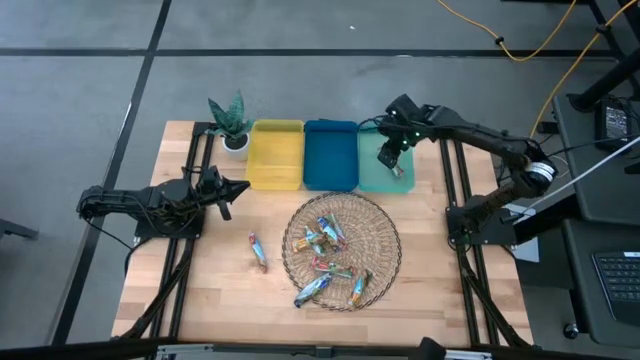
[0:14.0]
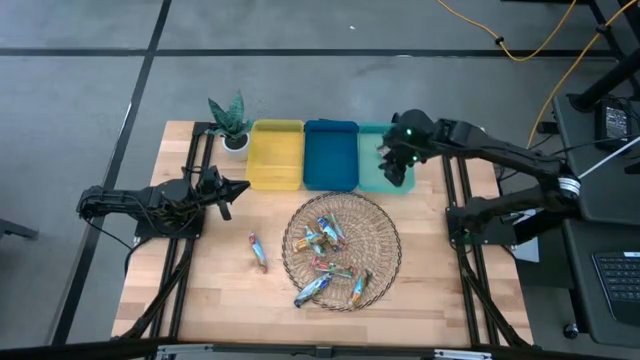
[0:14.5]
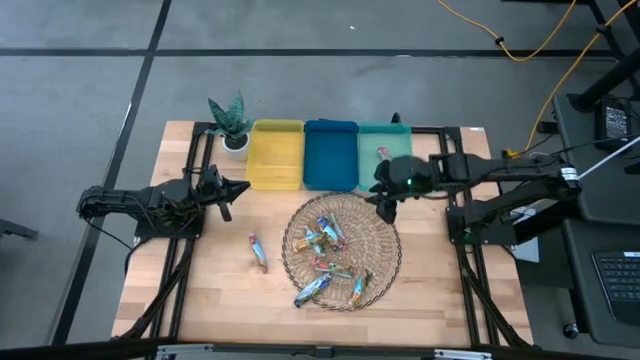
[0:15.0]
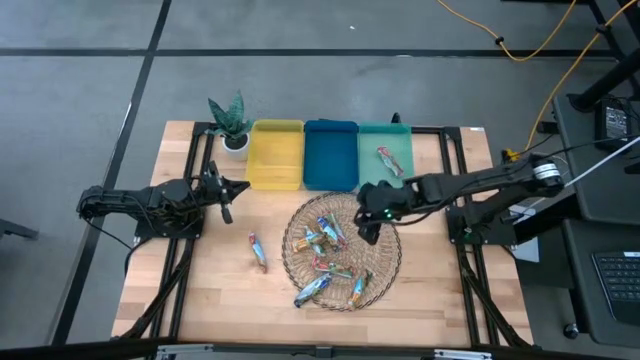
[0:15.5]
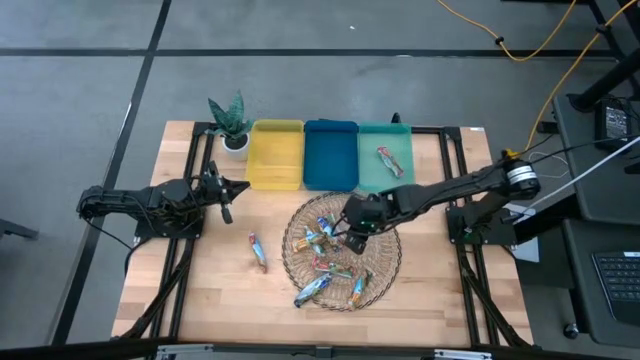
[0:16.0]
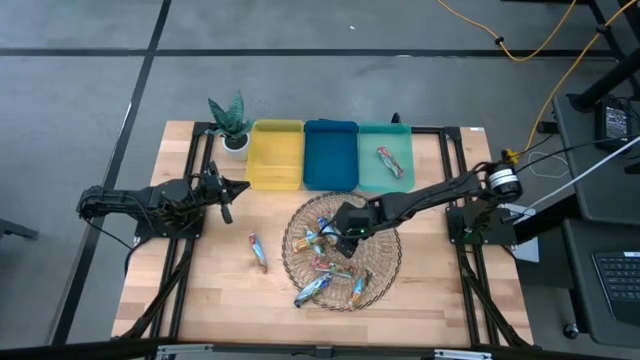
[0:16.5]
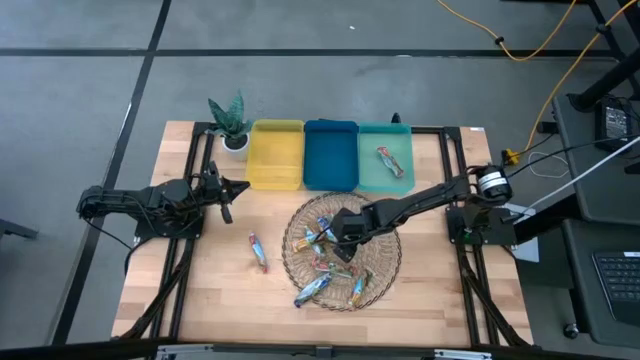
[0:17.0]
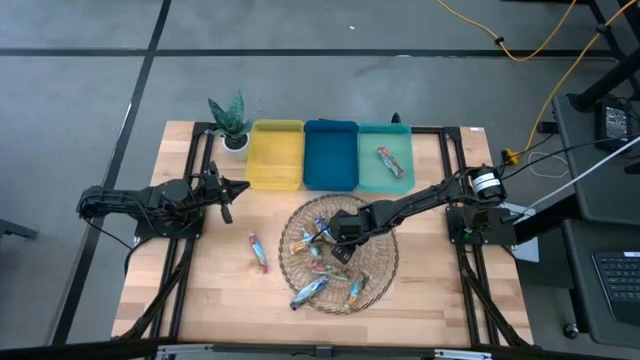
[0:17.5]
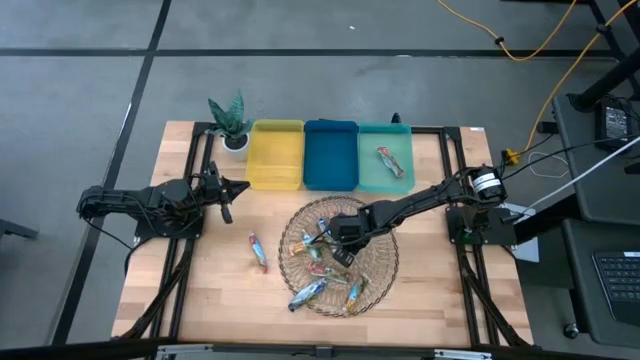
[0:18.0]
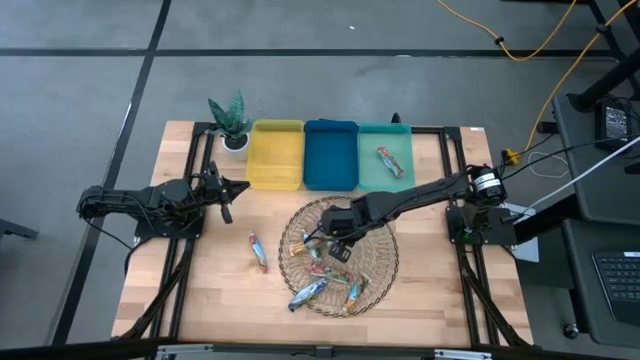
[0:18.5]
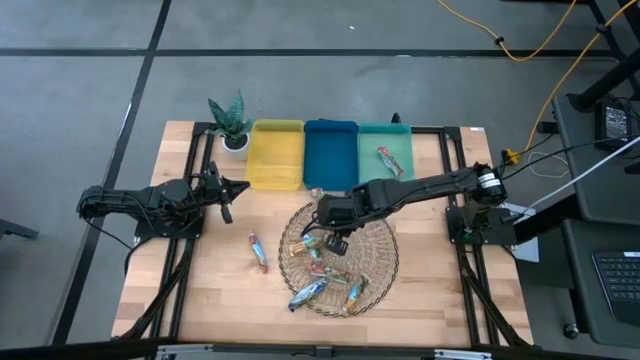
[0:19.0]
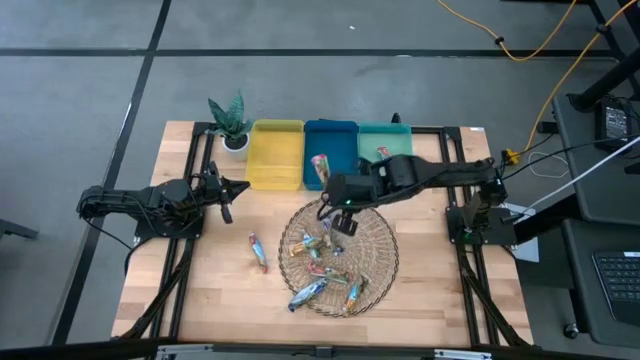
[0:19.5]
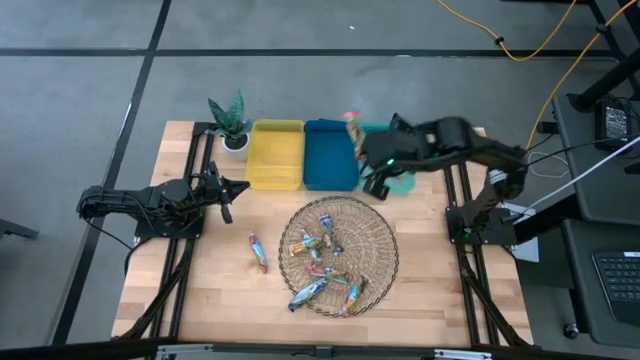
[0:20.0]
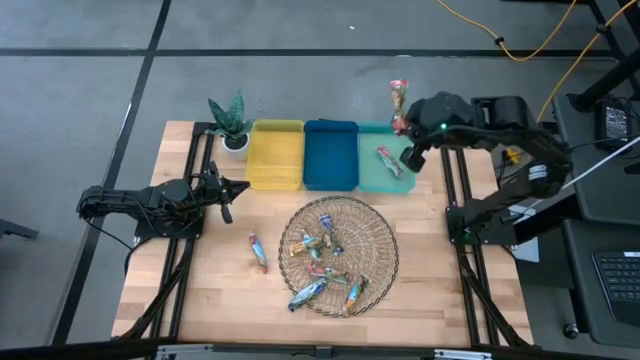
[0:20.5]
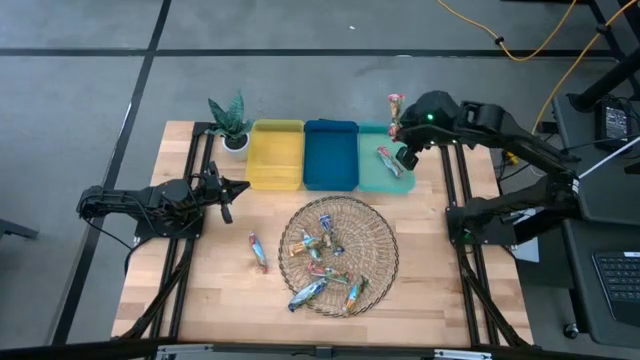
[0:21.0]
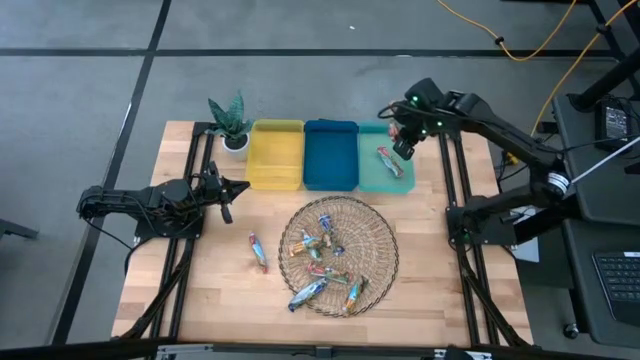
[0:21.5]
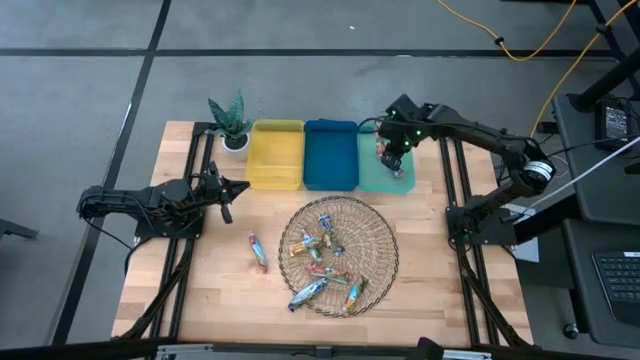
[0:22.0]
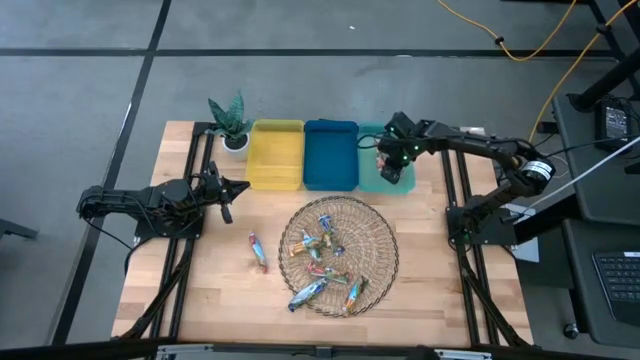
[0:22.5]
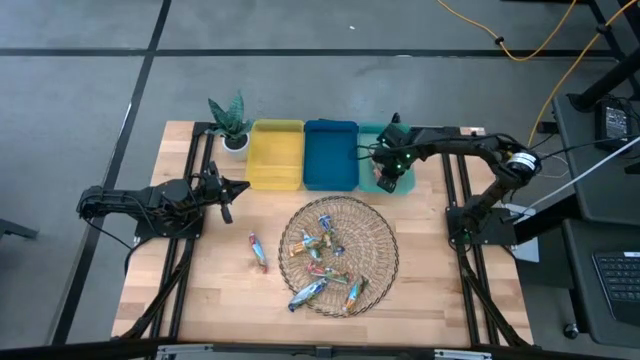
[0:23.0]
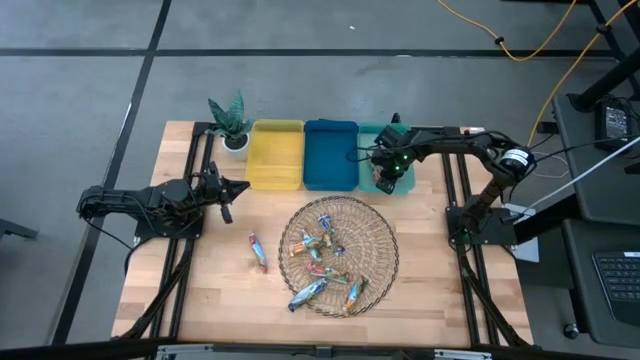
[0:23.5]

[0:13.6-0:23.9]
Task: Pick and place Granola Bars by type
Put the red granola bar into the green bin

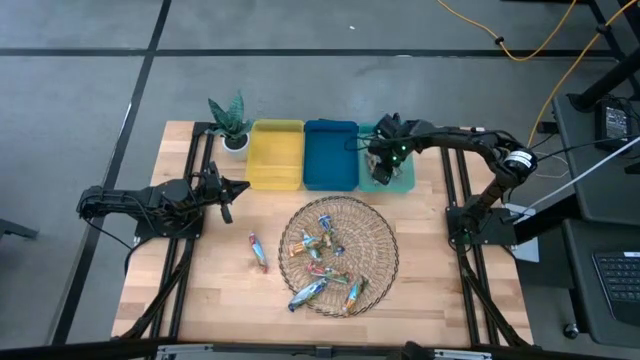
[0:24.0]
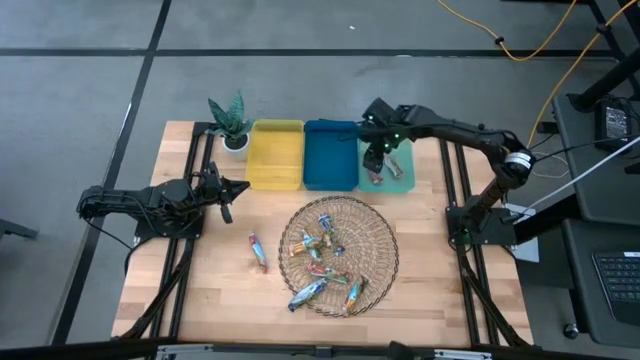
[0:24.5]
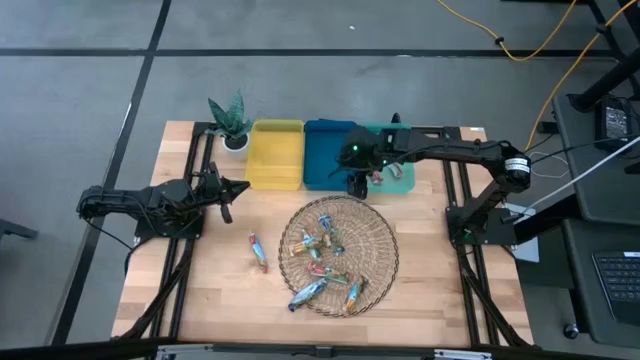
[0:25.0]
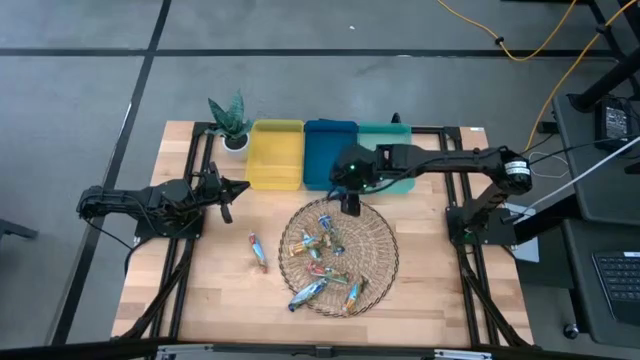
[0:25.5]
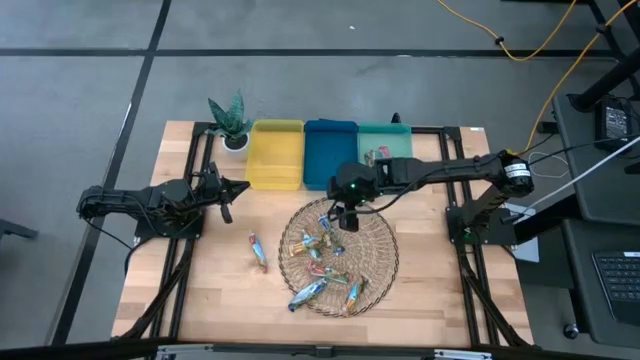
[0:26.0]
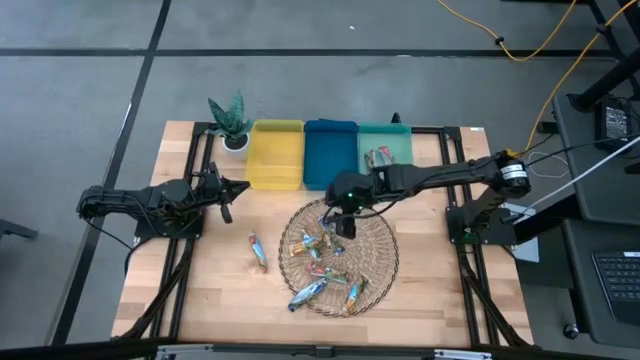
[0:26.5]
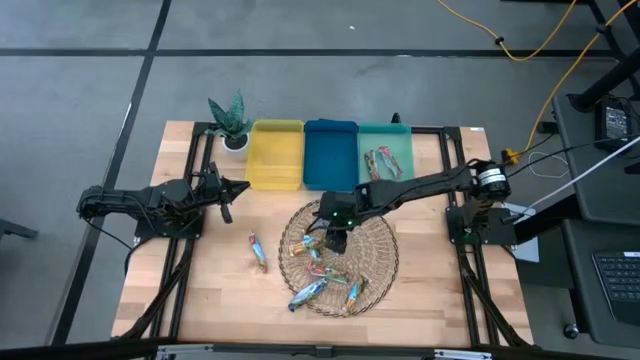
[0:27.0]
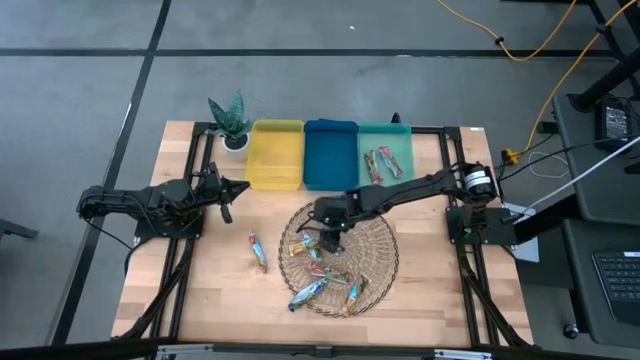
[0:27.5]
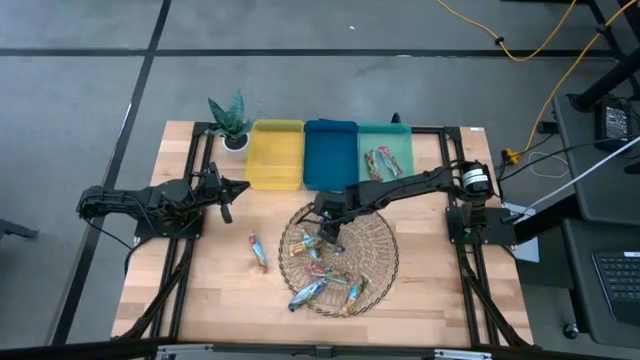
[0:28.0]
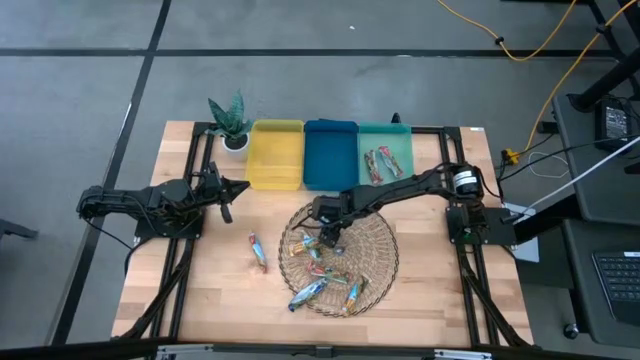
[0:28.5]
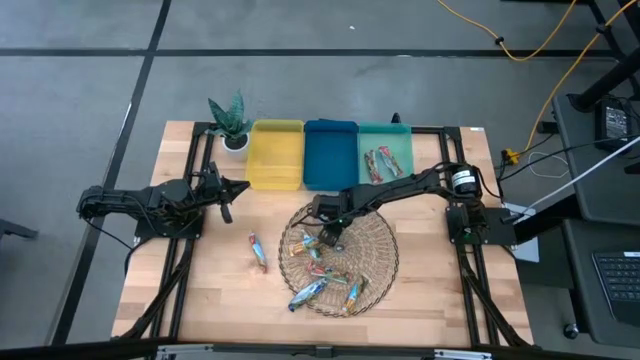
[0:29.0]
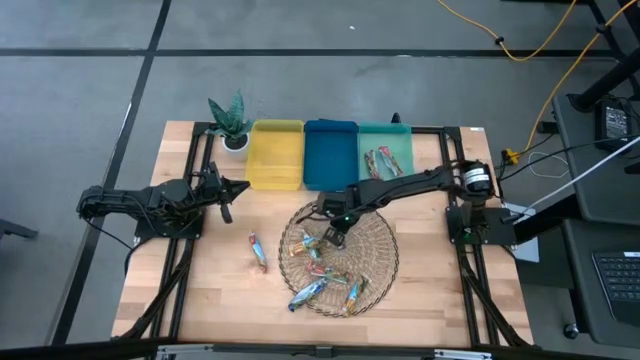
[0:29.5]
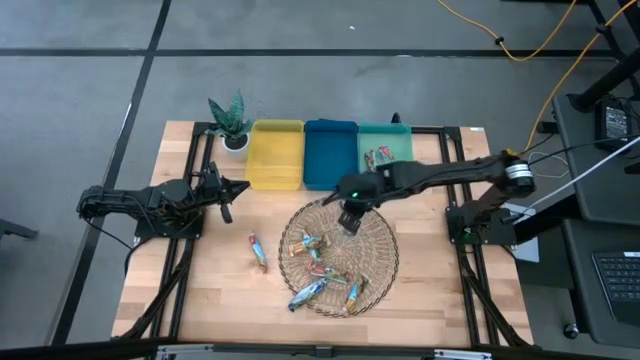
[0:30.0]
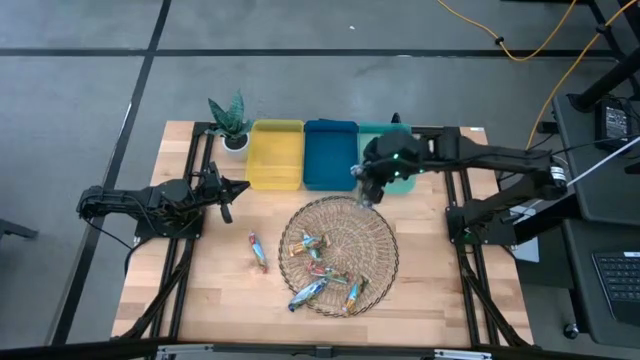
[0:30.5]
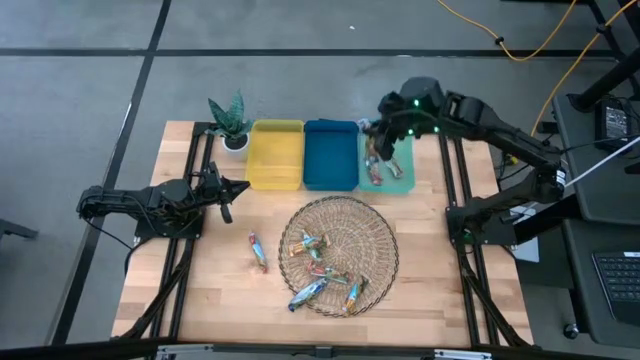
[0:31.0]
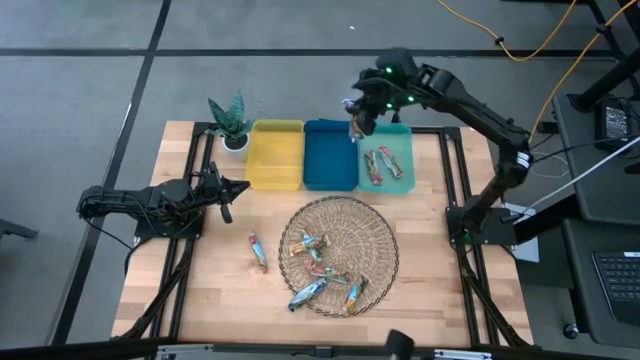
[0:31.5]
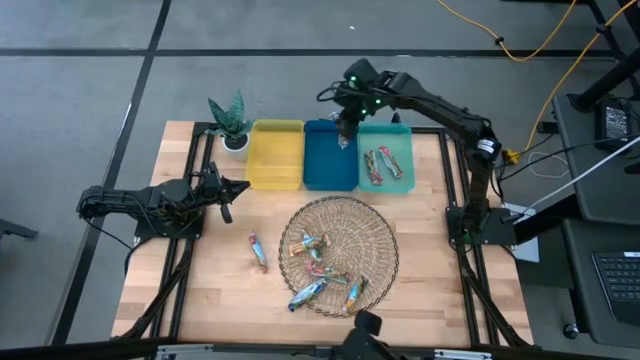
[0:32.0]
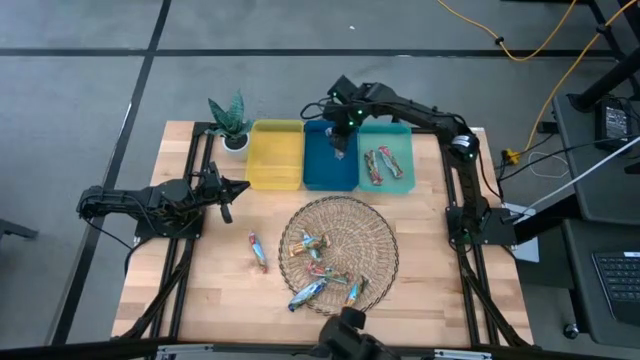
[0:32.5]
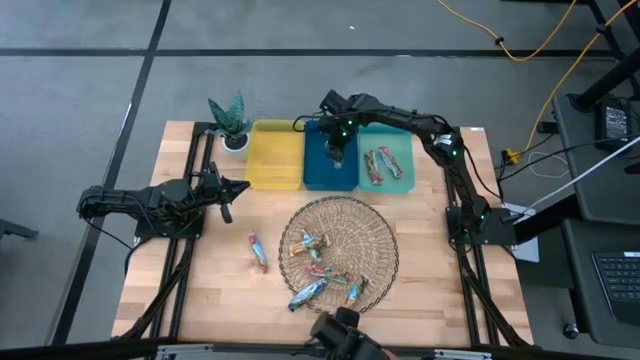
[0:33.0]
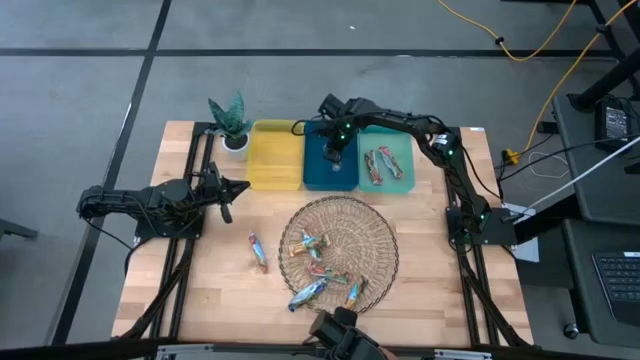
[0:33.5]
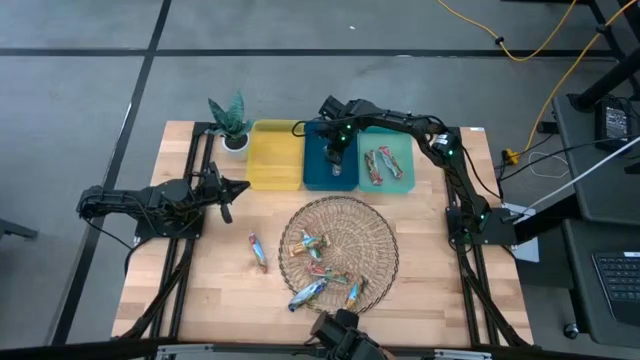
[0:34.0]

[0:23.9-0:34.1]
Put the blue granola bar into the blue bin
